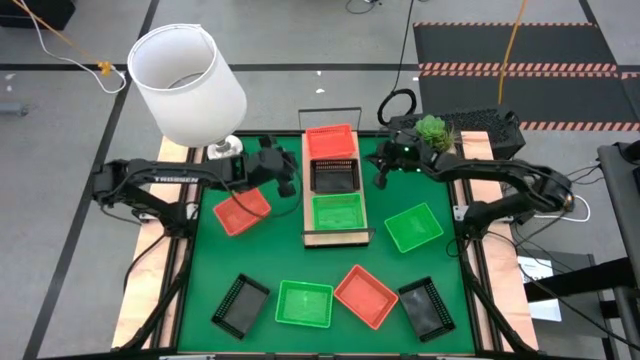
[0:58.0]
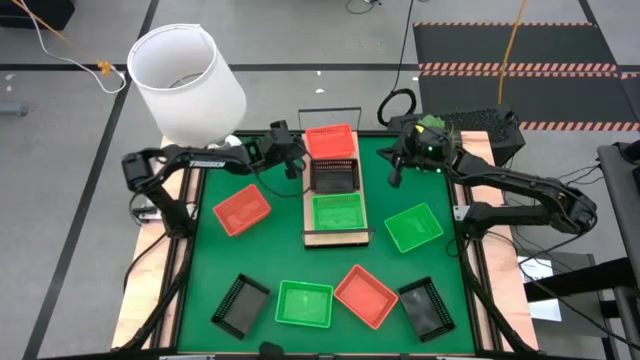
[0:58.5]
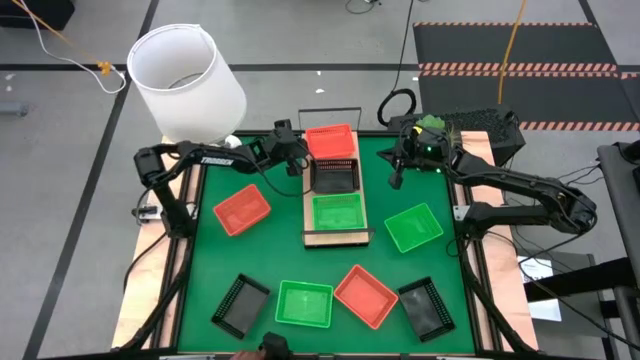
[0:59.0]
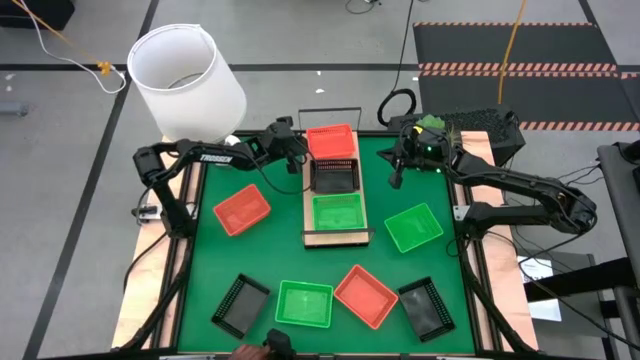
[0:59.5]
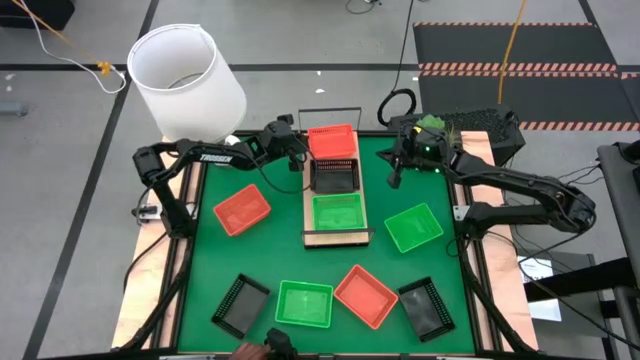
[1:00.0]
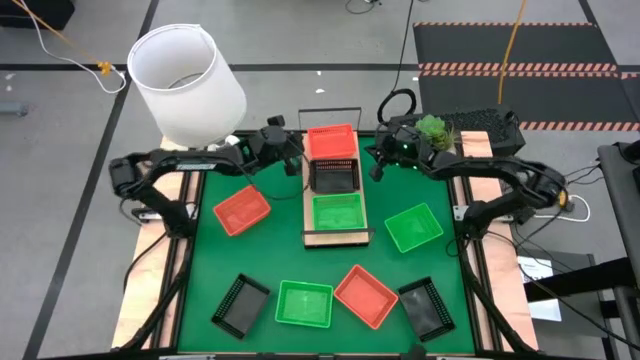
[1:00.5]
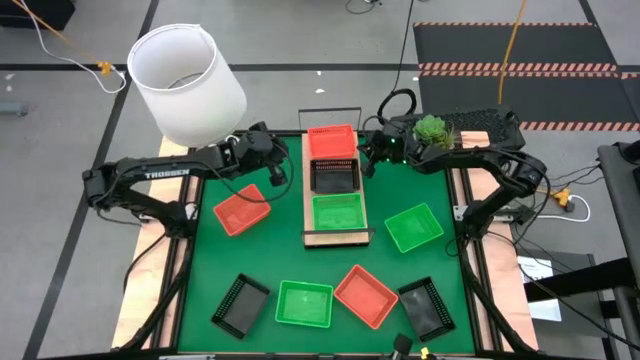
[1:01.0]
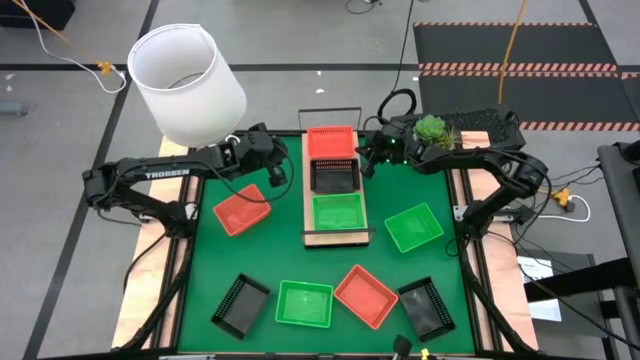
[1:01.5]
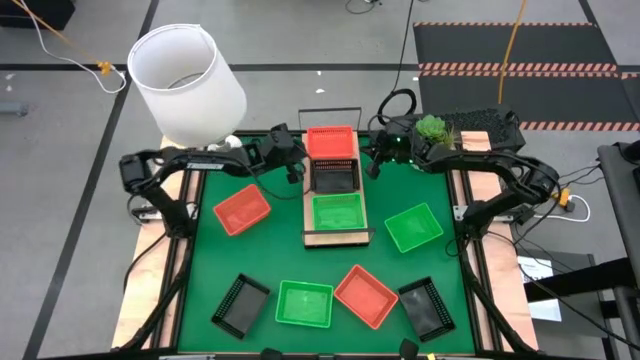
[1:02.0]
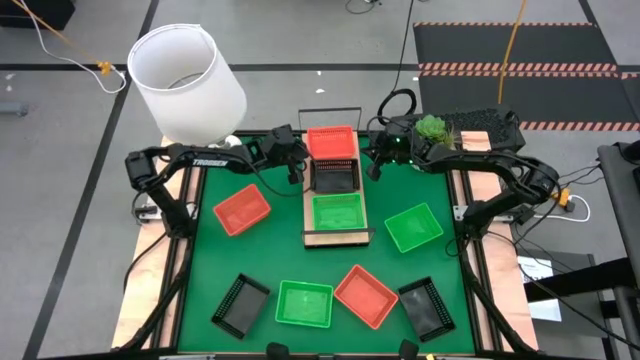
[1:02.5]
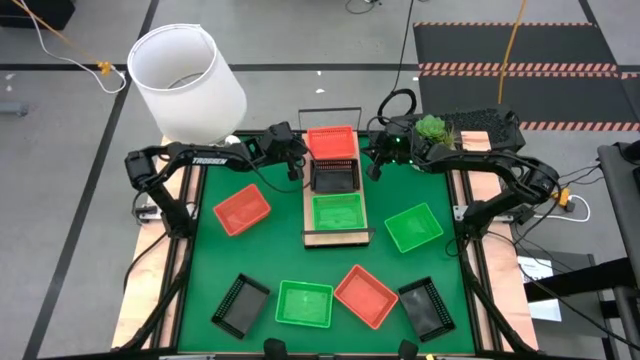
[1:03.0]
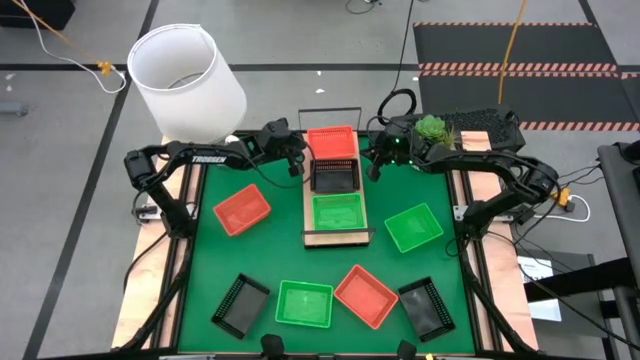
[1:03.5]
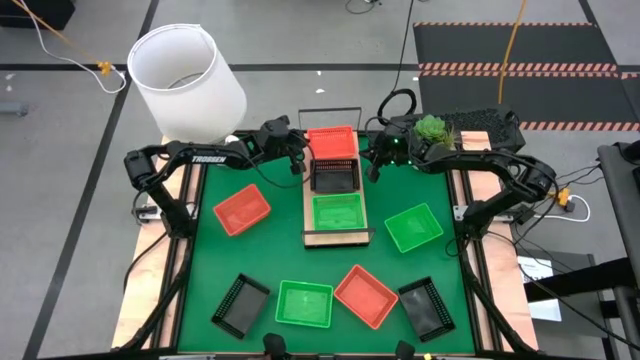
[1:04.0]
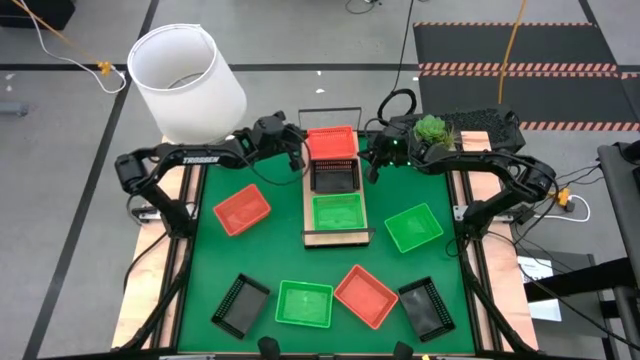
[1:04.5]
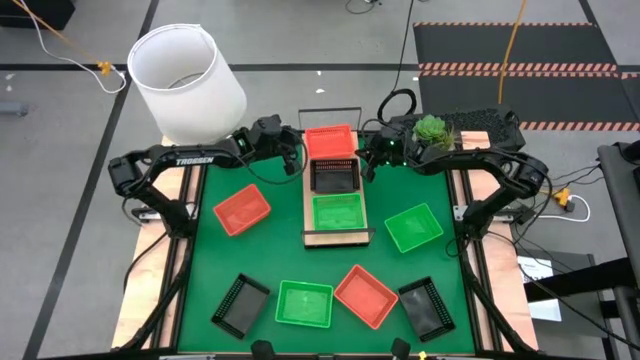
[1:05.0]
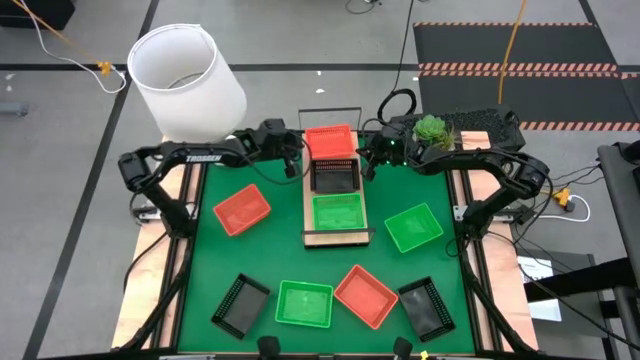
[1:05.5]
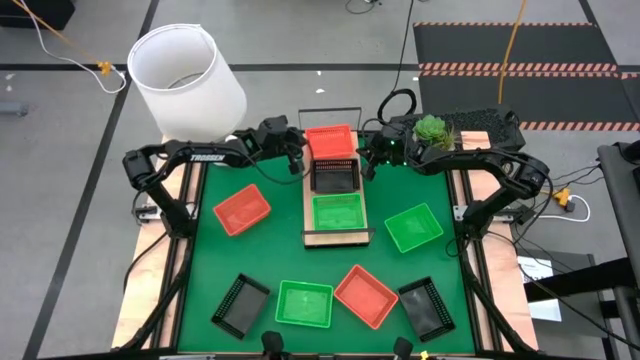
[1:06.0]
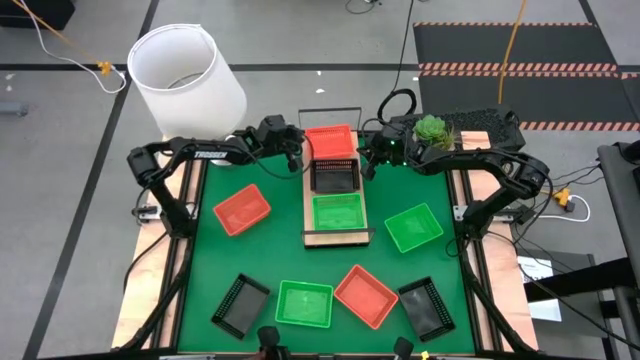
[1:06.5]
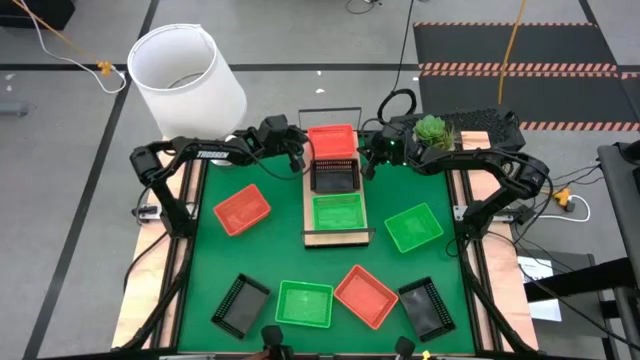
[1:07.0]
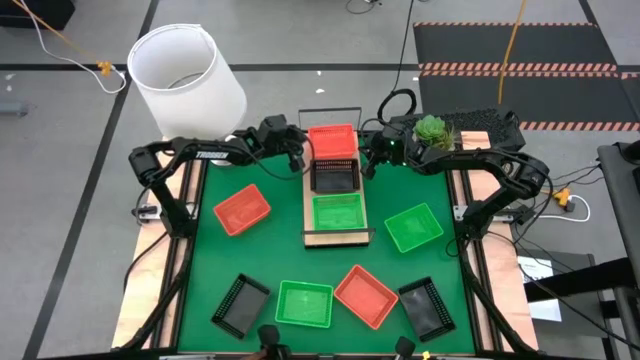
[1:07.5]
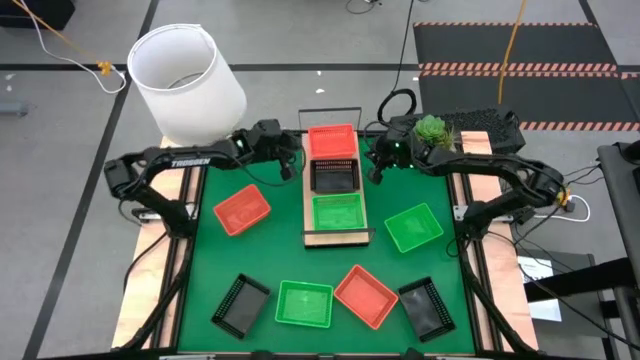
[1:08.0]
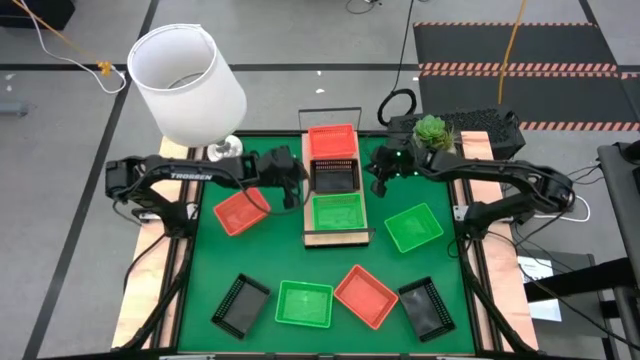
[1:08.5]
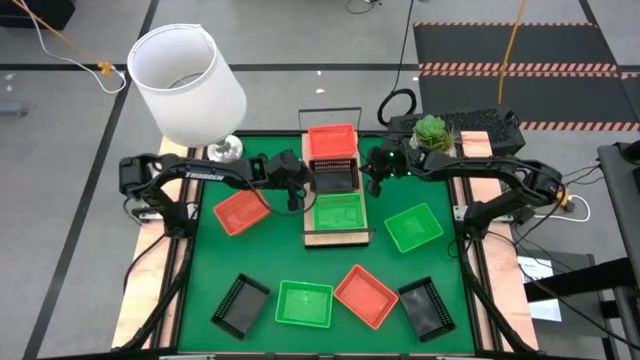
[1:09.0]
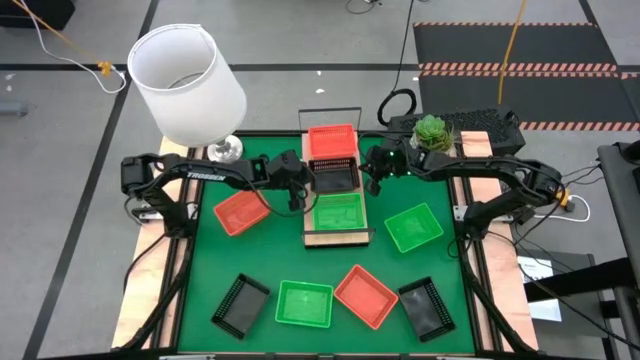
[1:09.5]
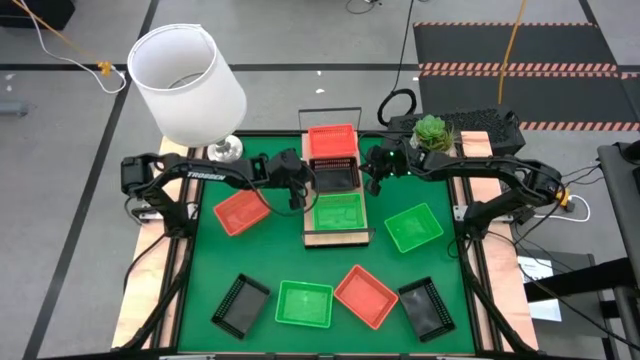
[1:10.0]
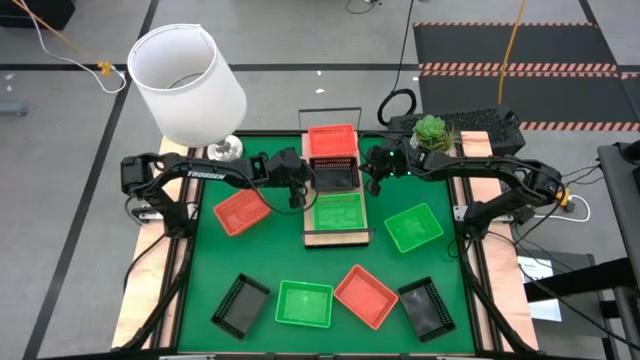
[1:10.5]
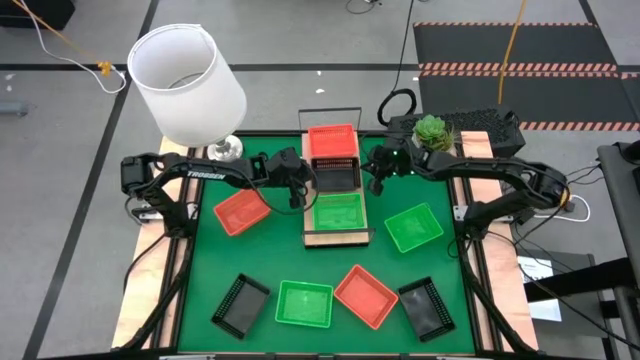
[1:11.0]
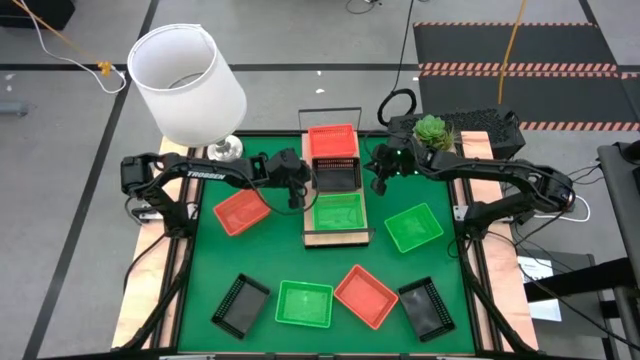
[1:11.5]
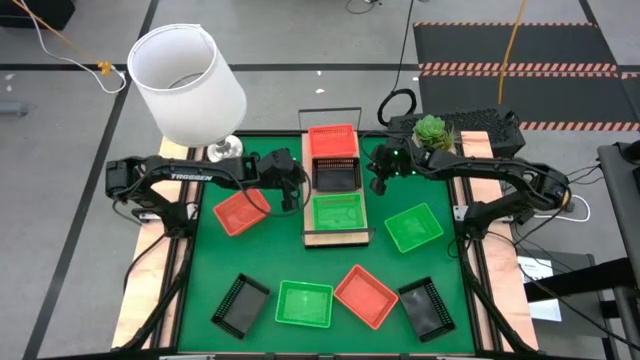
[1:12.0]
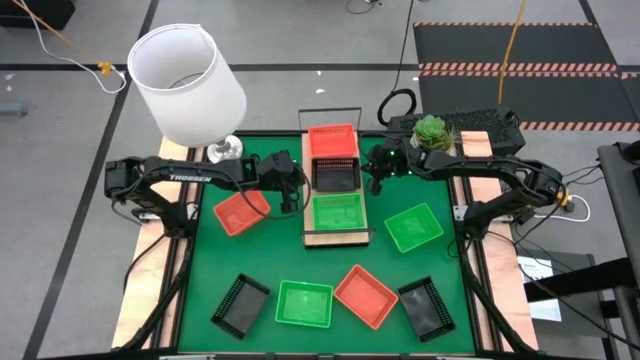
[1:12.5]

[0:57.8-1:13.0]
Task: Stack baskets on shelf by color
Adjust the bins on the shelf

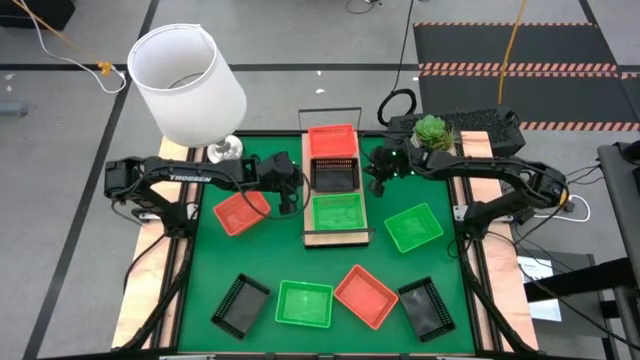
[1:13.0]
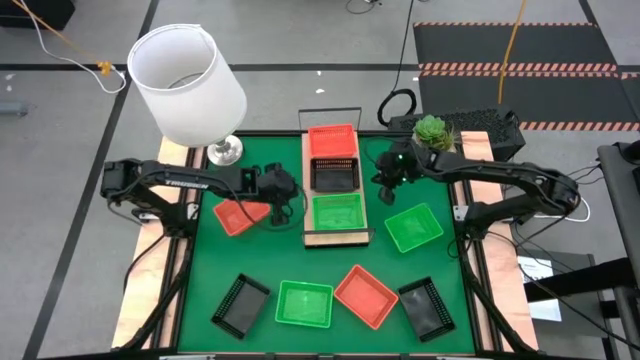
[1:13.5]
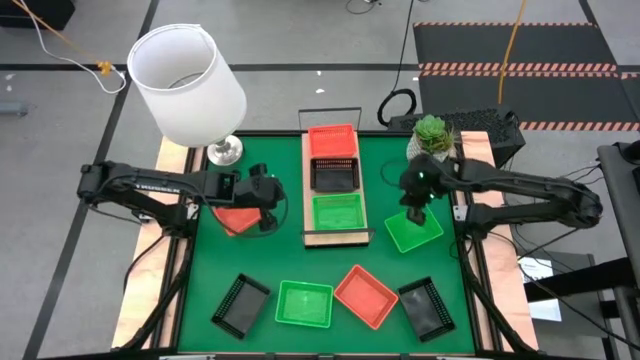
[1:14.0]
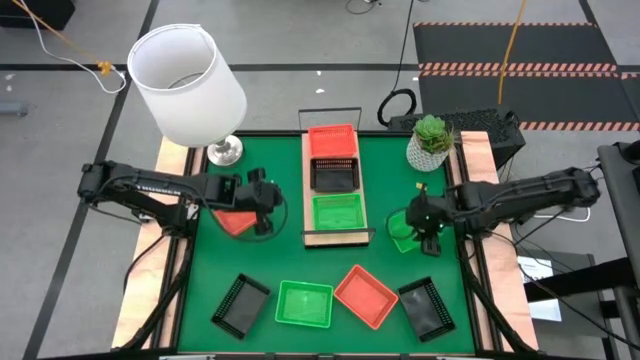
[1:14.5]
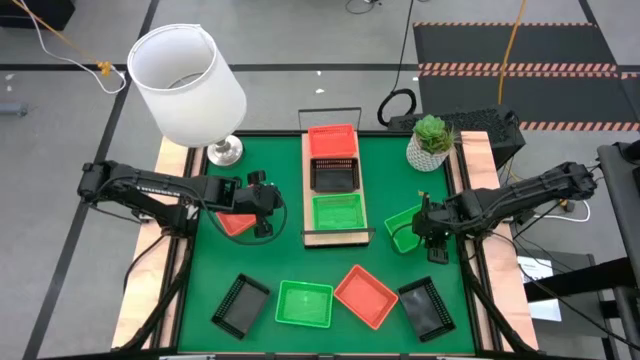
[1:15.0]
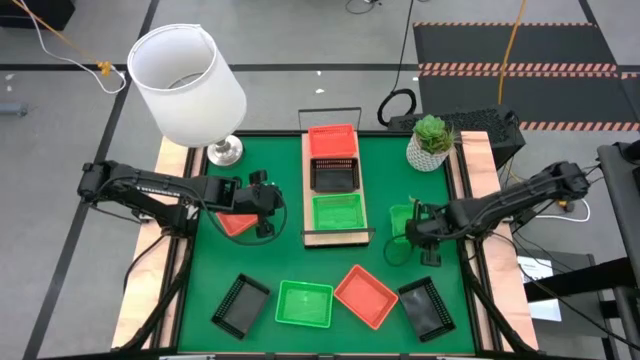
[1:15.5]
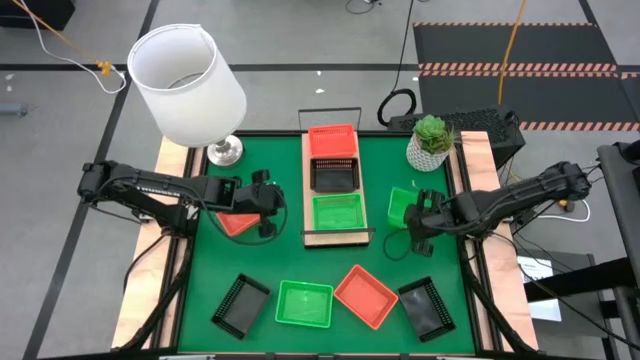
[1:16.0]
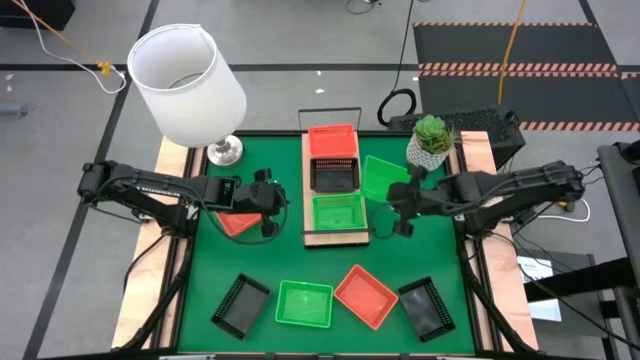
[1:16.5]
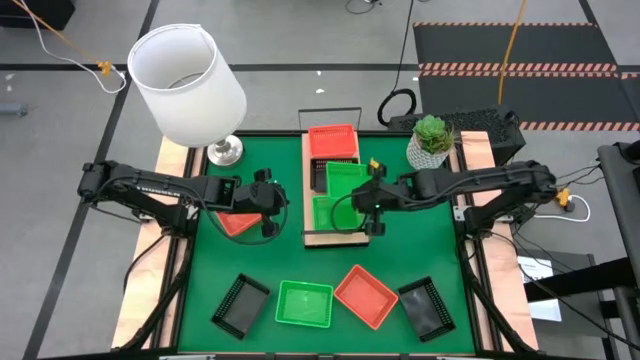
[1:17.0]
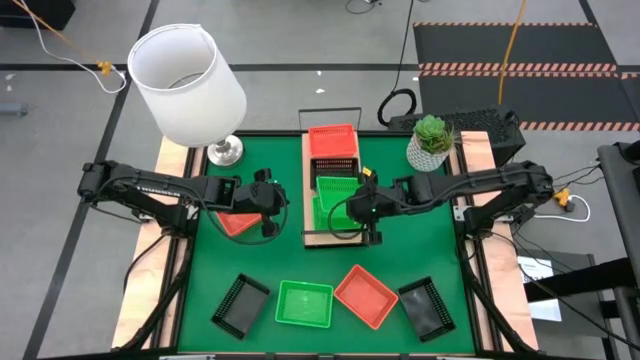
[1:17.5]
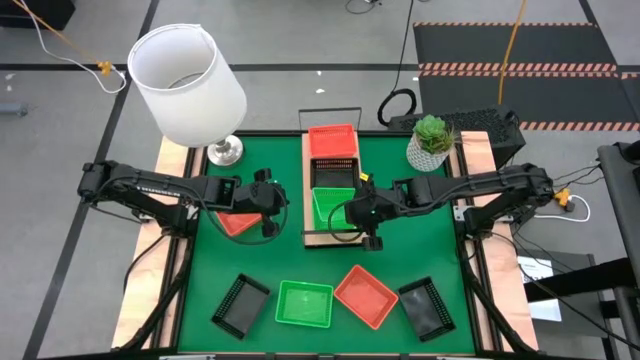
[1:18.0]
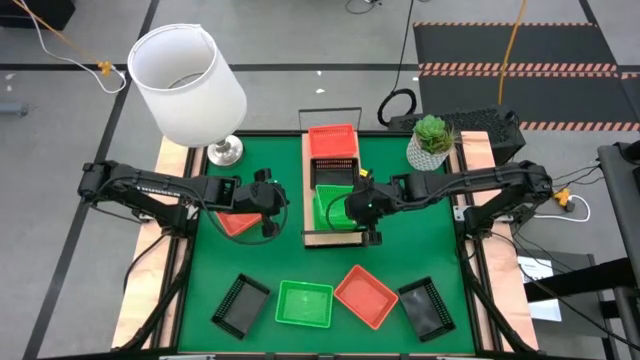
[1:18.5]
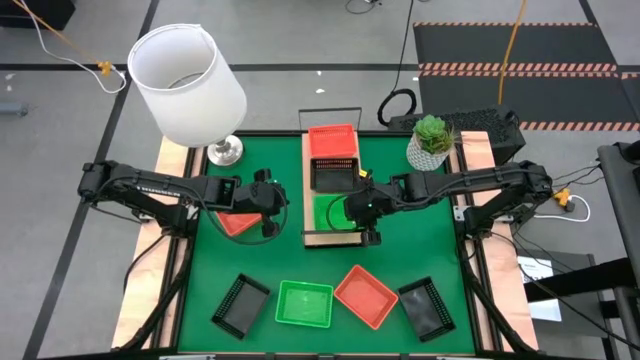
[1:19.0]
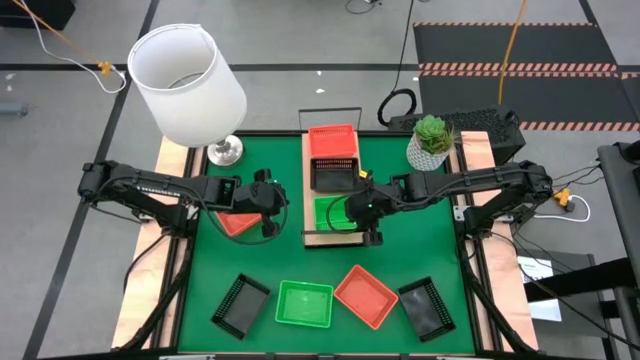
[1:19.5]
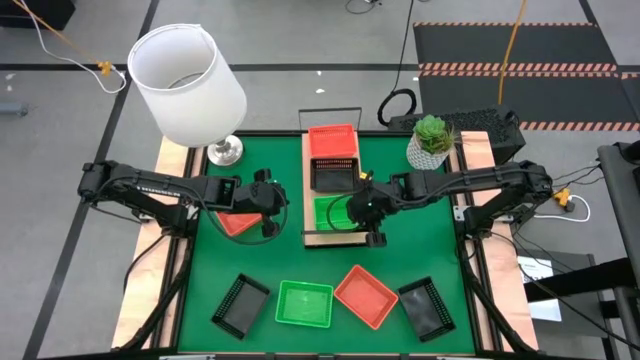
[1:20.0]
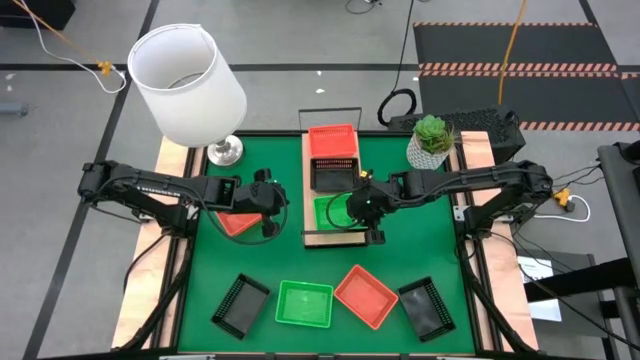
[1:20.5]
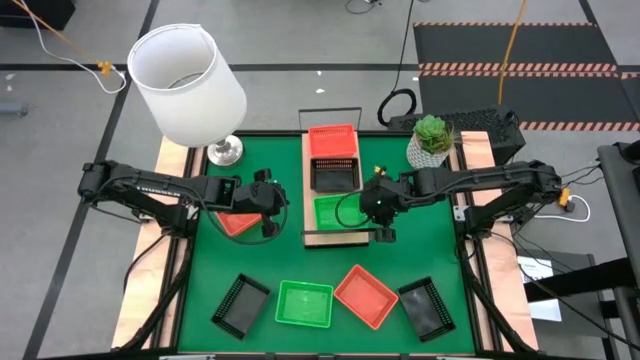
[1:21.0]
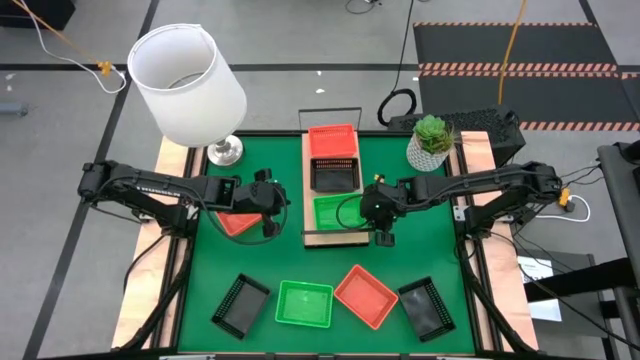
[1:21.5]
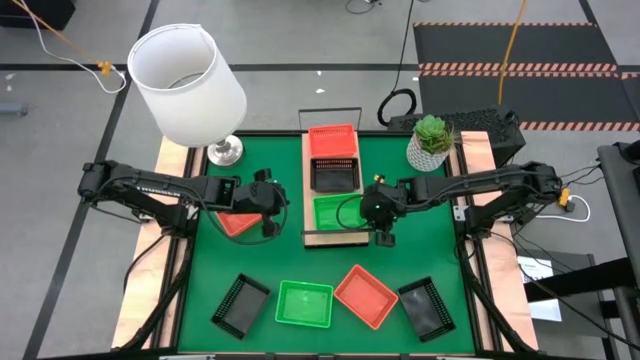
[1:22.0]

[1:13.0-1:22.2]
Stack the top green bin on the green bin on the shelf
